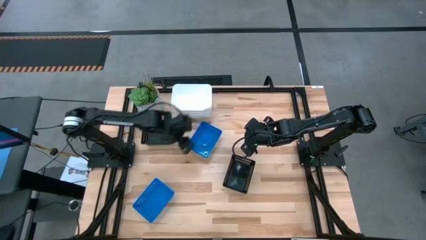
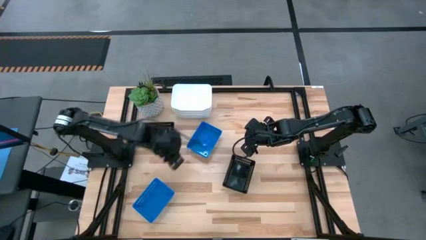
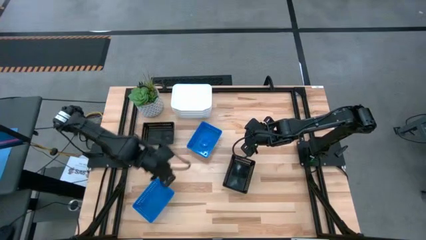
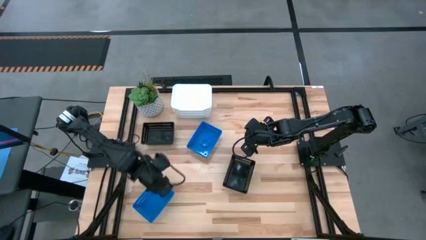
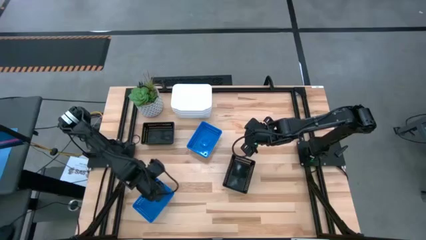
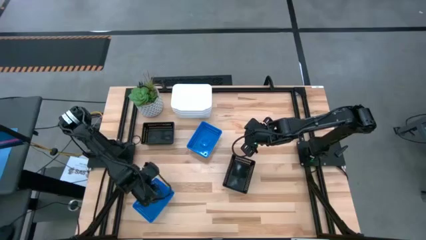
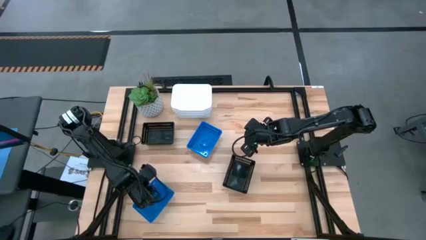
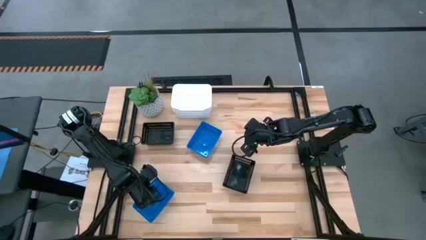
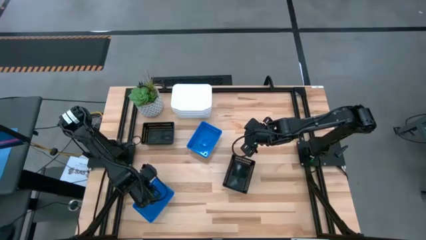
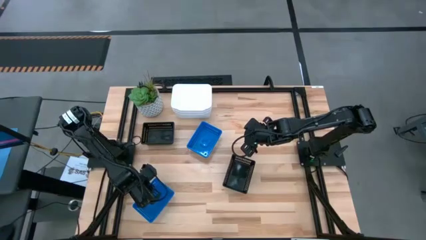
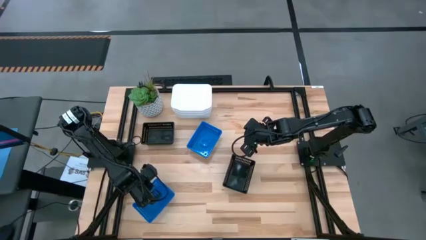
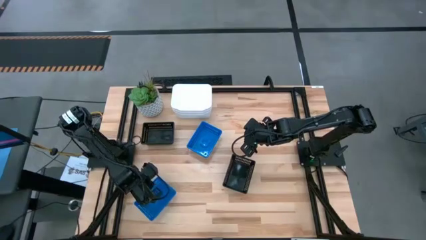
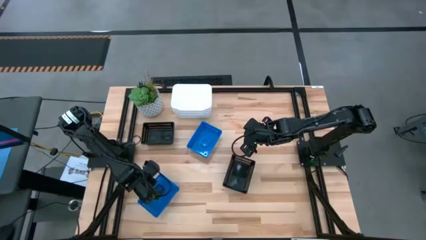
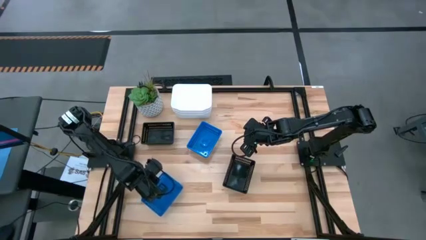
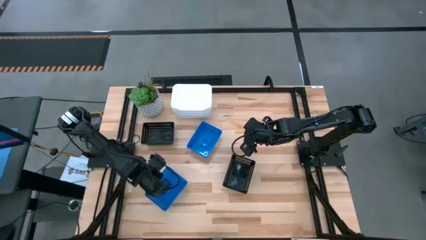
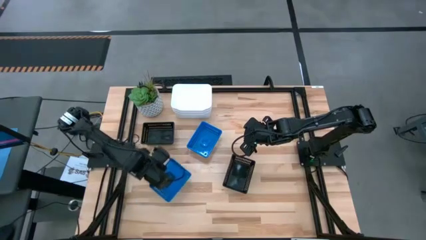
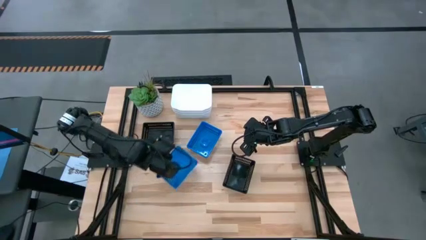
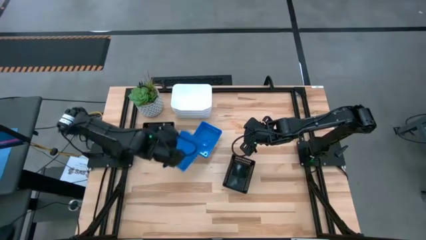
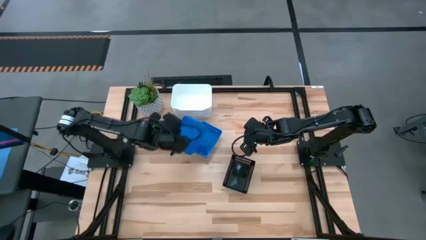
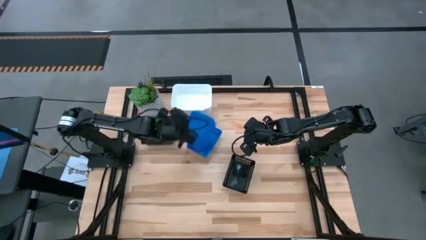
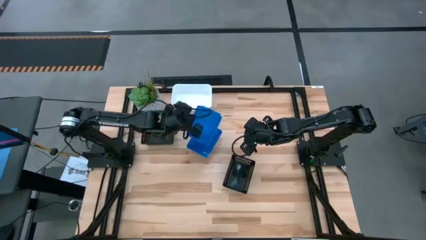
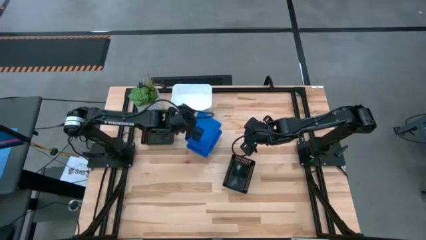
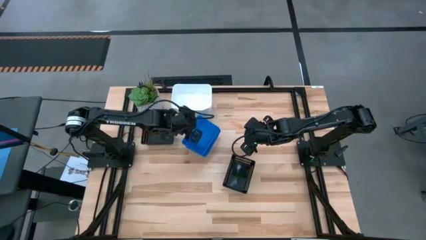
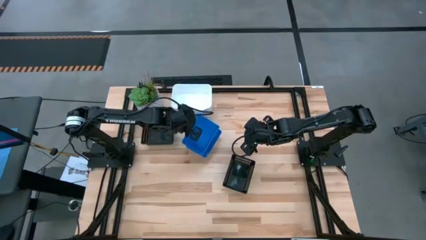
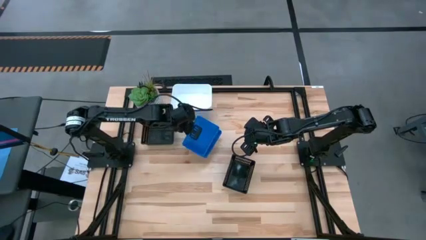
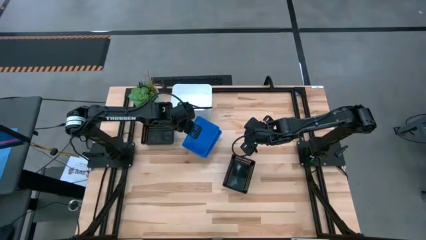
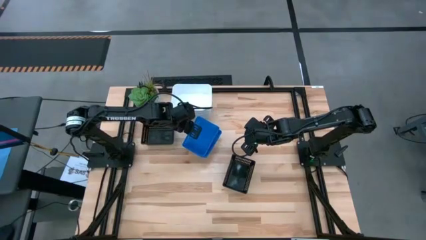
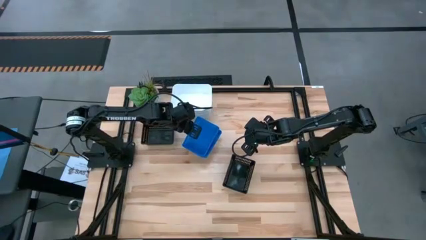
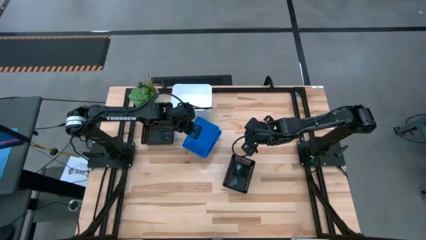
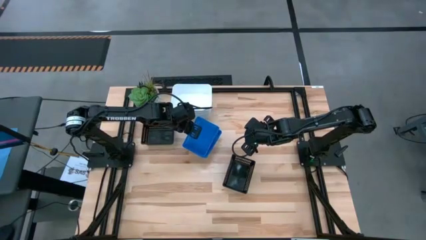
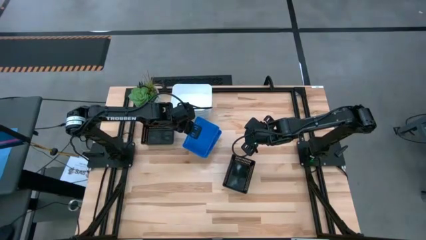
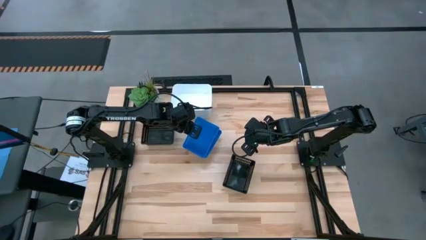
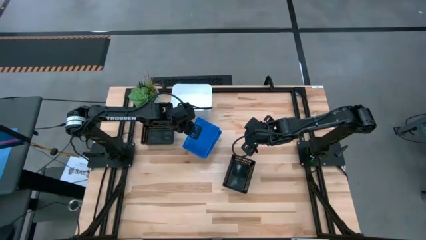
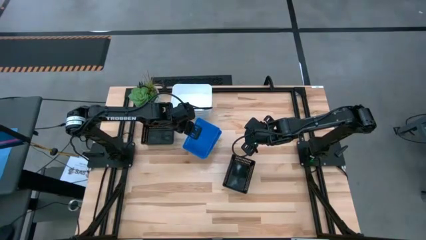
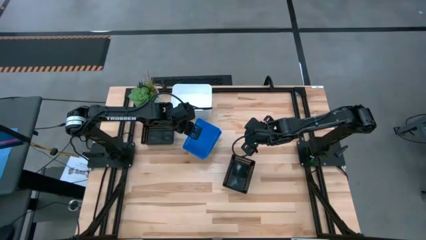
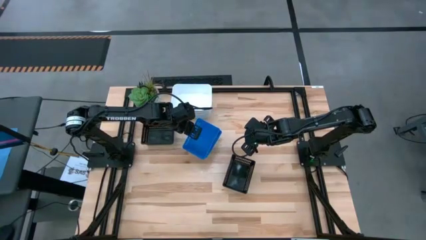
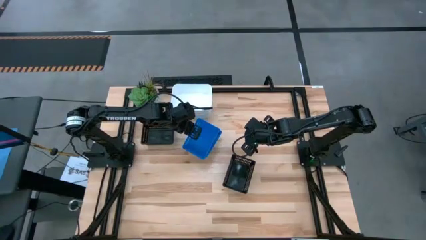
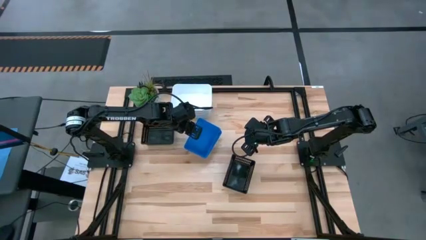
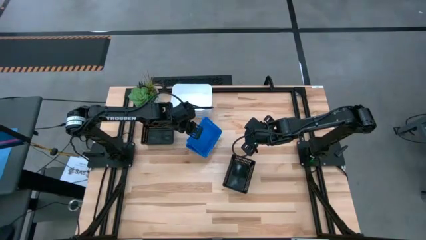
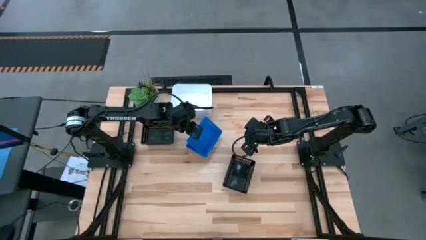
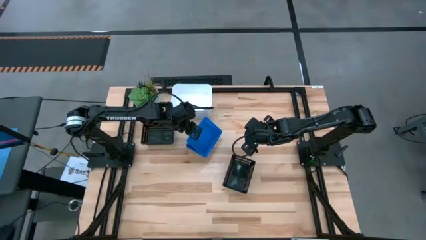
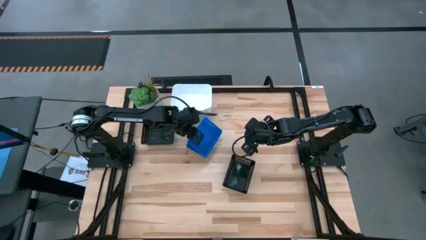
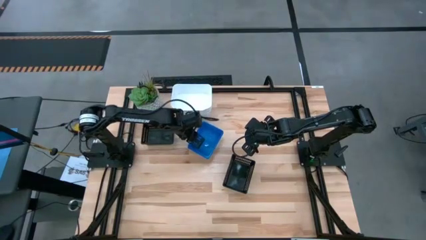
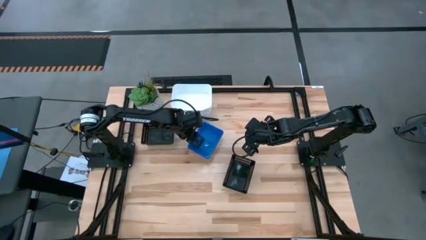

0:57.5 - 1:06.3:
Stack the bottom blue bin on top of the other stacked blue bins

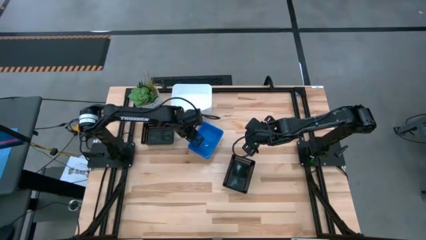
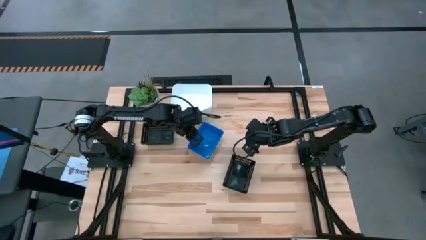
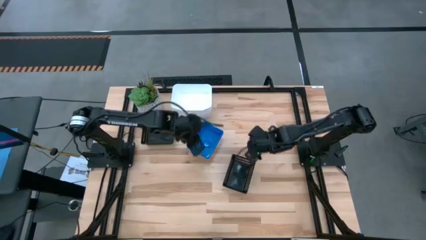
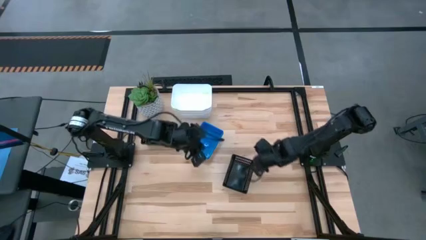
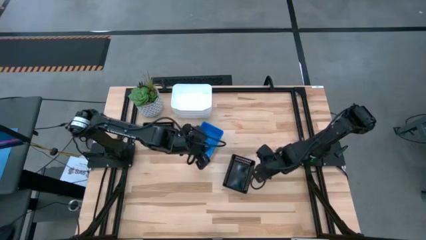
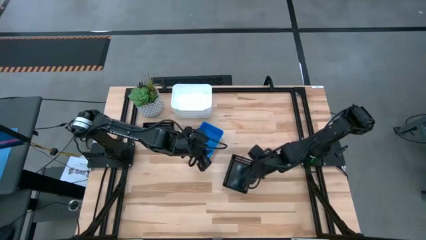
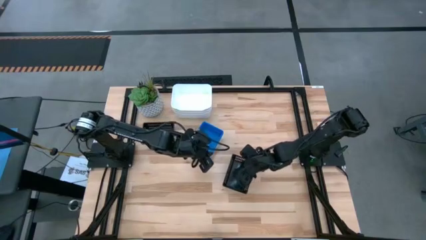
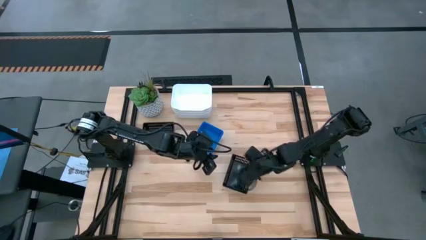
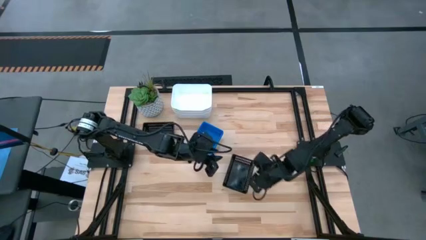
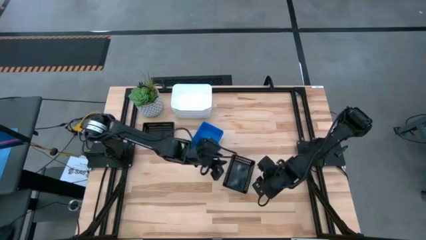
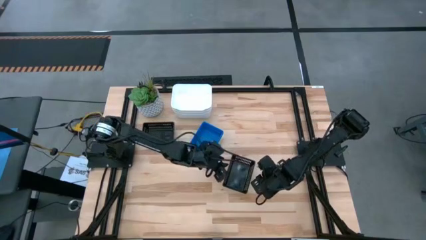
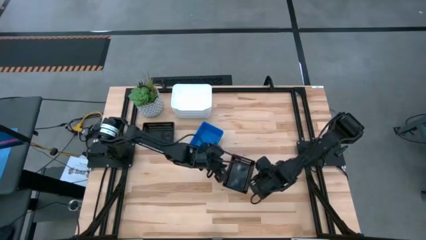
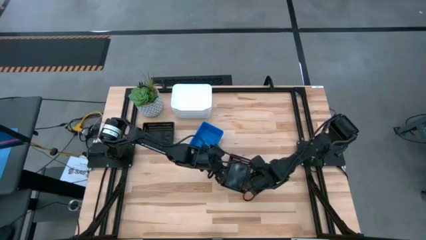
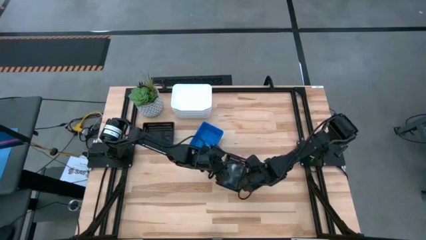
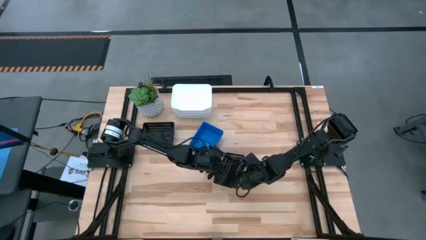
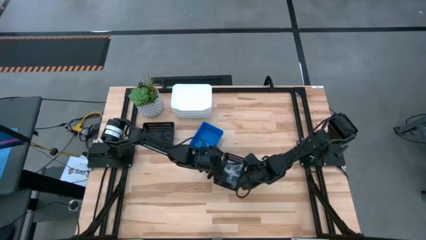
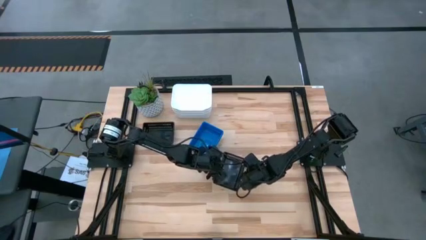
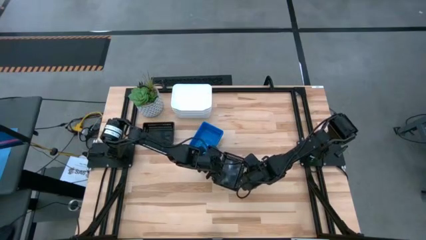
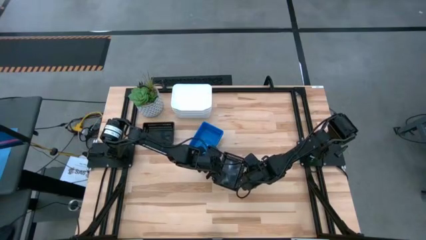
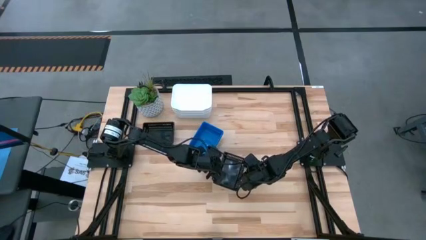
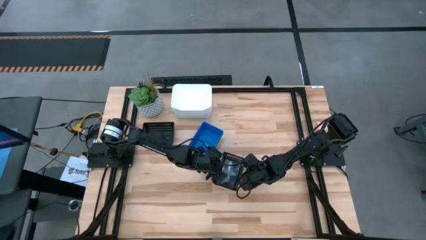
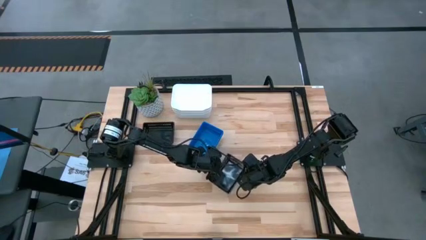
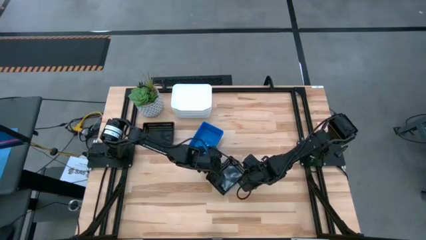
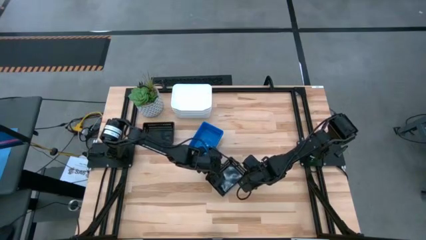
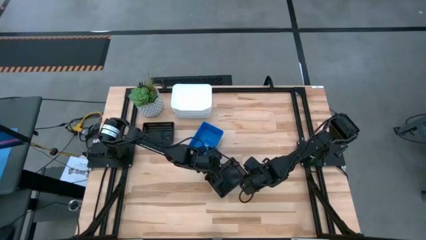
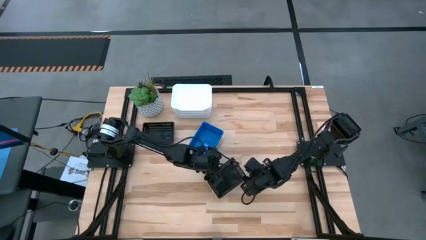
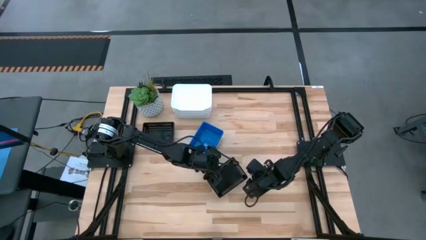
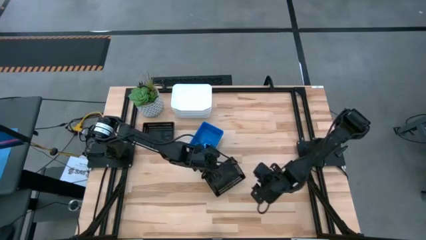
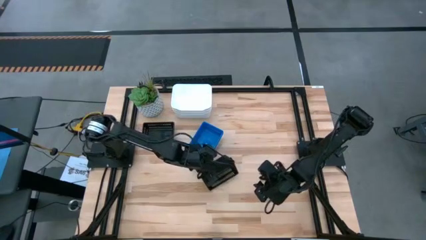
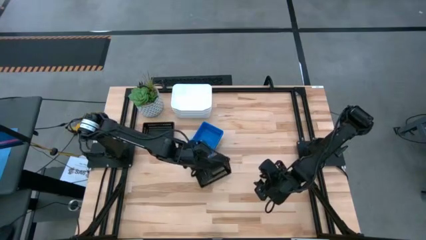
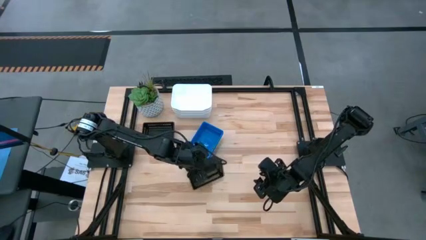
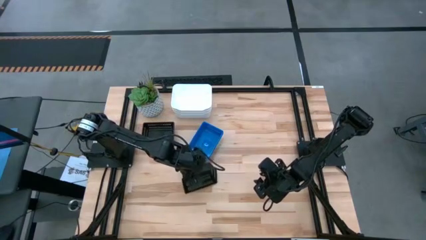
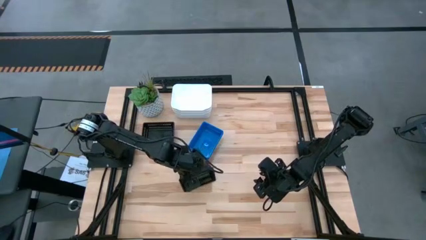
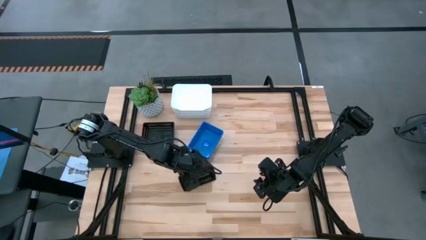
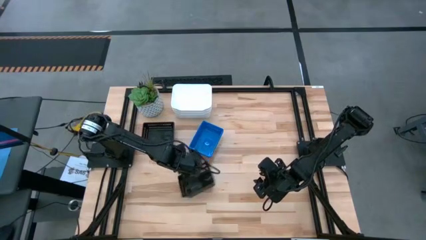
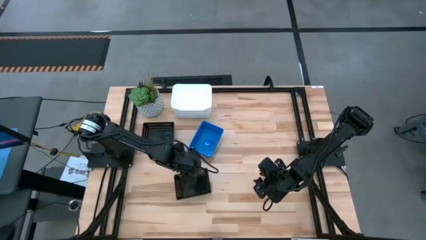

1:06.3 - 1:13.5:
Stack the right black bin on top of the other stacked black bins
